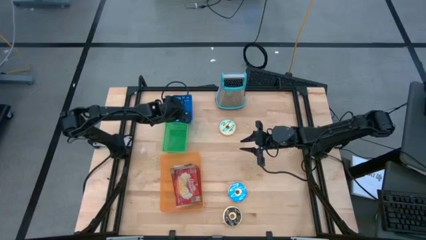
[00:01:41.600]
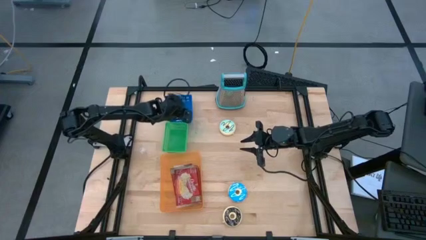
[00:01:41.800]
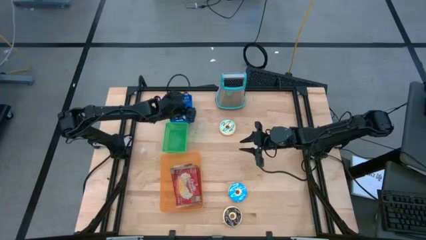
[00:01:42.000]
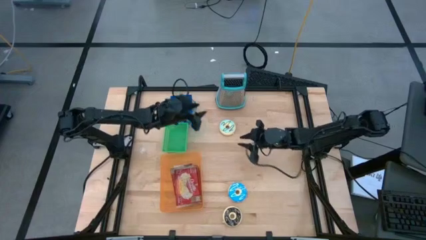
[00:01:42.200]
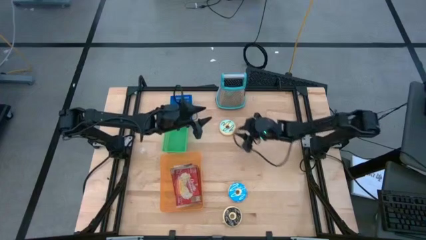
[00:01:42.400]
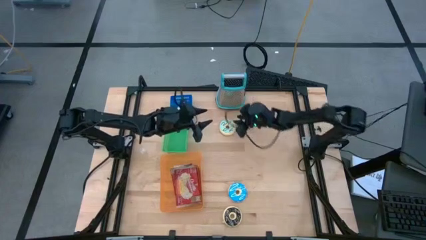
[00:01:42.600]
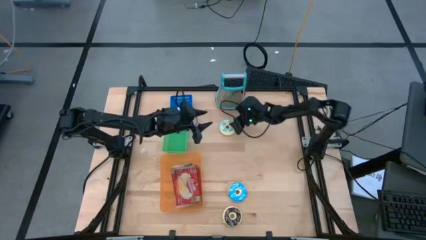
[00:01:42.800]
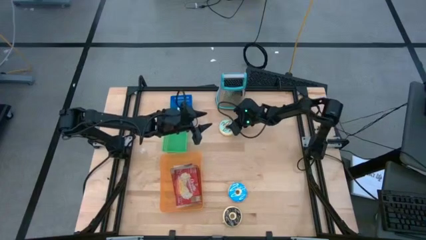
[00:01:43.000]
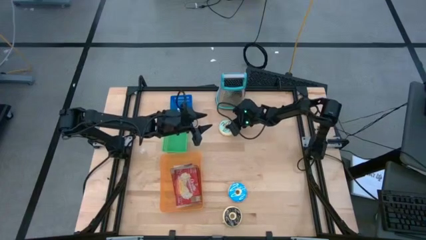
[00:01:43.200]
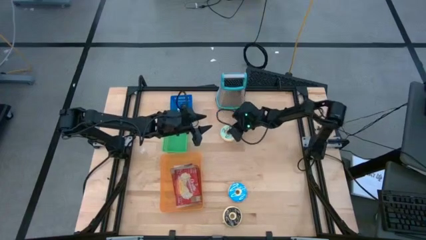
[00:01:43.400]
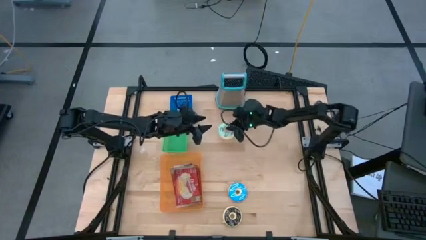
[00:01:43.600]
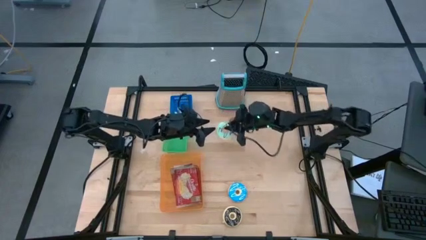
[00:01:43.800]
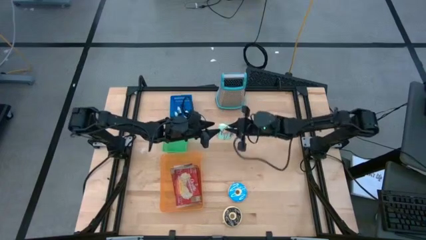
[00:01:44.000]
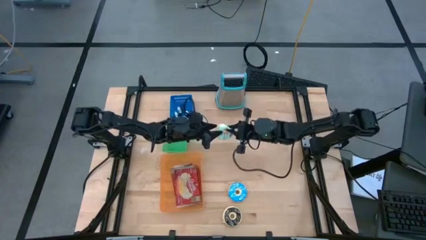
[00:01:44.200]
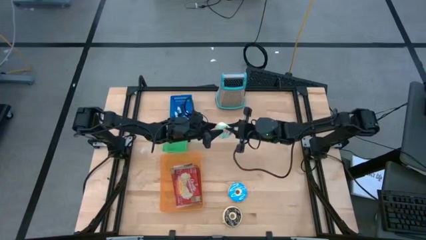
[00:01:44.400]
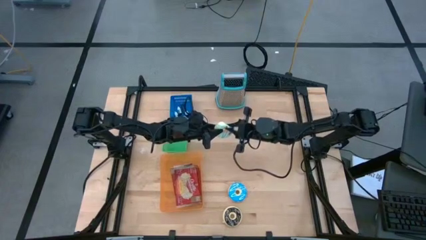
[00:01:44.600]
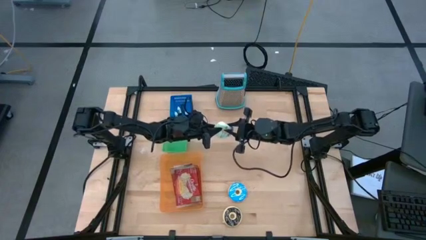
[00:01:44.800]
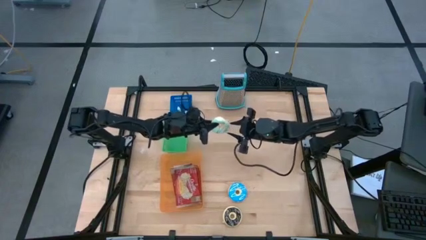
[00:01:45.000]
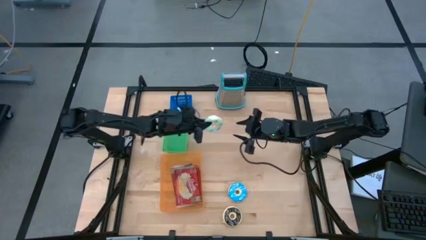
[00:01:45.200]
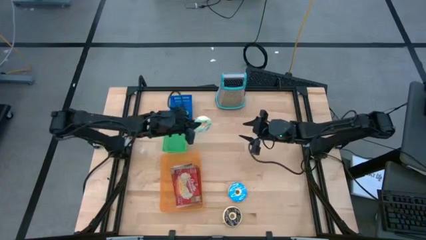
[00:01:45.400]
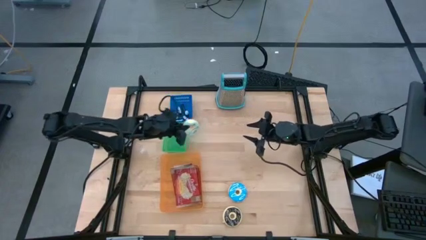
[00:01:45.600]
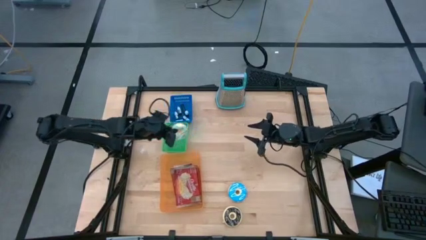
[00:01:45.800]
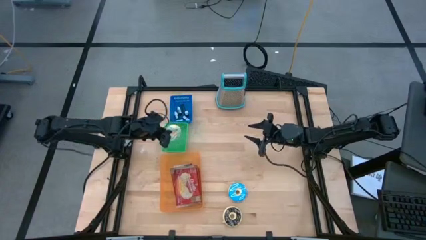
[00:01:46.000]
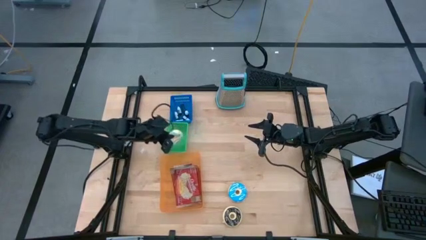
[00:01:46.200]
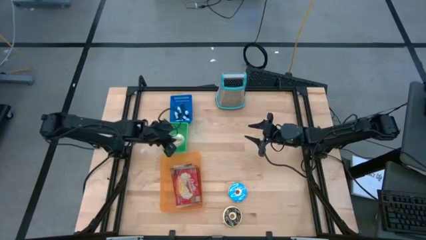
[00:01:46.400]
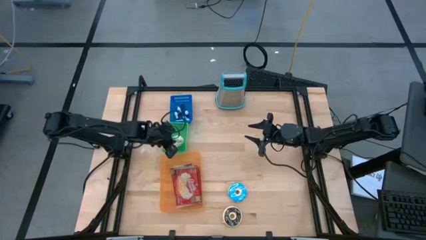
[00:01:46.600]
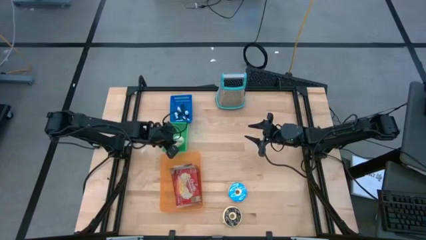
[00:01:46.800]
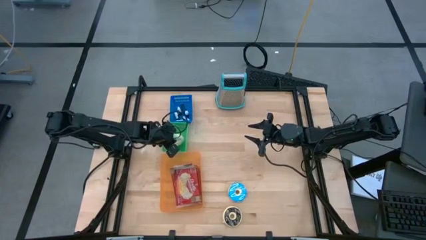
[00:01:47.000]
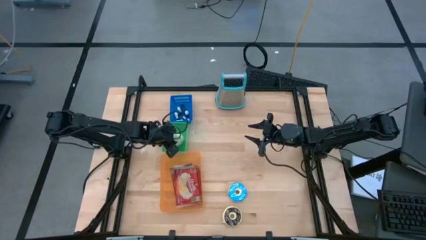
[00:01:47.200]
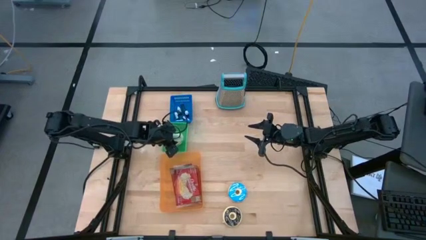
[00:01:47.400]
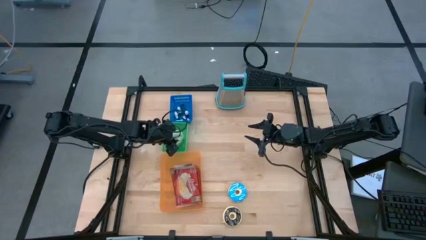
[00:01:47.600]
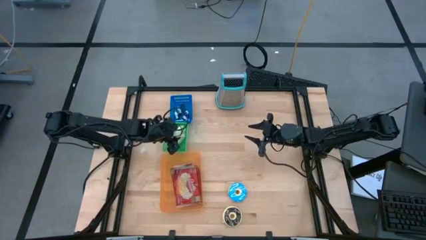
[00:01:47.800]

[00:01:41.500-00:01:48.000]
Put the light blue donut into the green bin

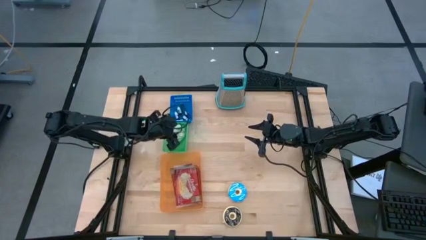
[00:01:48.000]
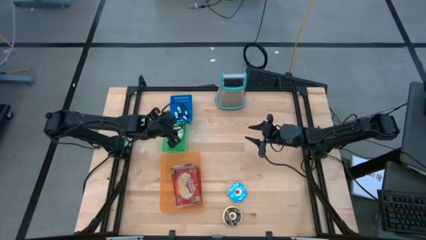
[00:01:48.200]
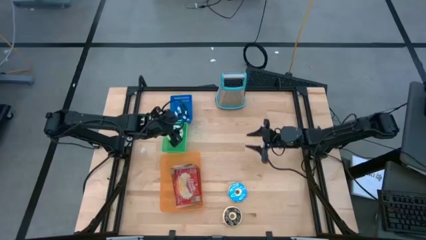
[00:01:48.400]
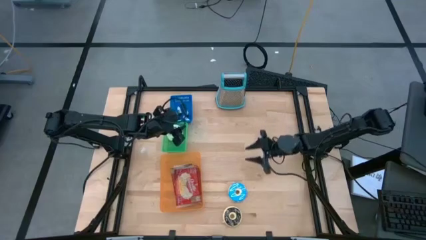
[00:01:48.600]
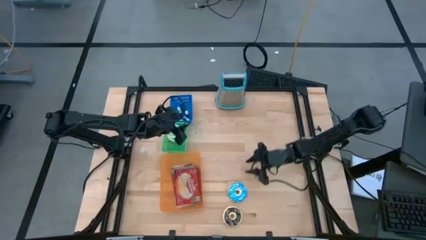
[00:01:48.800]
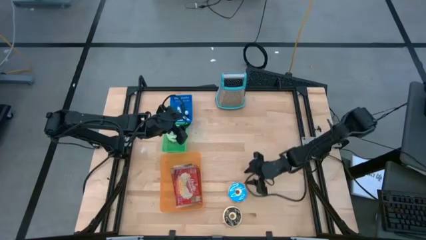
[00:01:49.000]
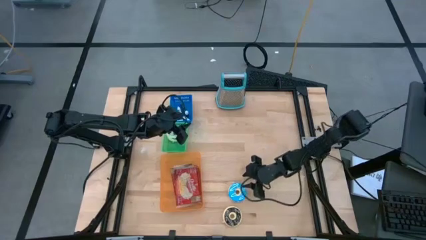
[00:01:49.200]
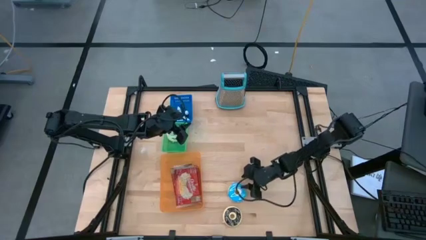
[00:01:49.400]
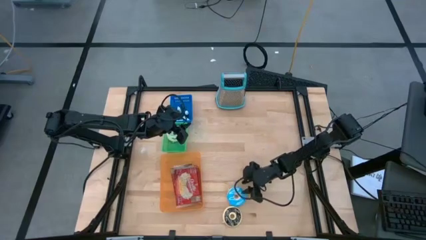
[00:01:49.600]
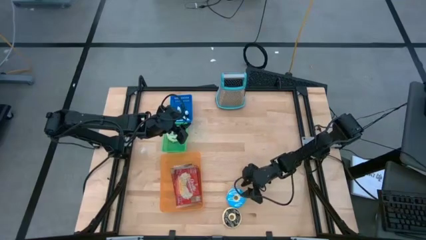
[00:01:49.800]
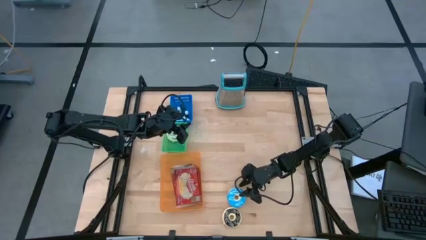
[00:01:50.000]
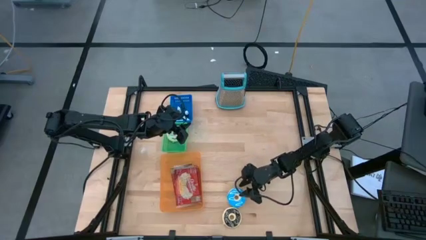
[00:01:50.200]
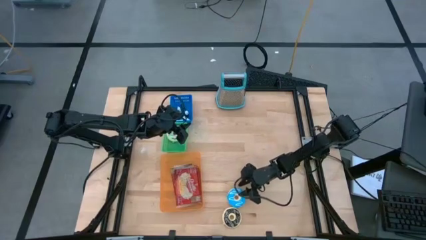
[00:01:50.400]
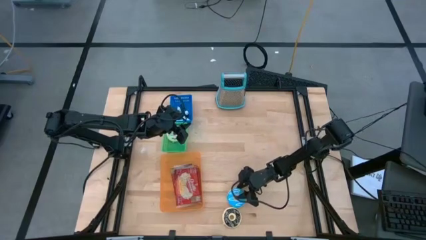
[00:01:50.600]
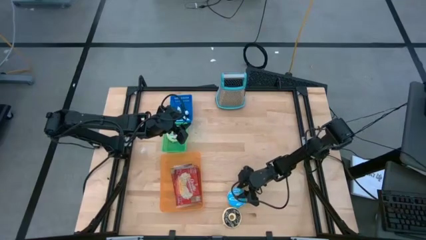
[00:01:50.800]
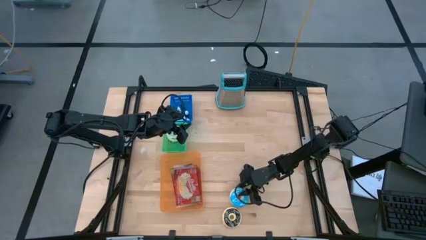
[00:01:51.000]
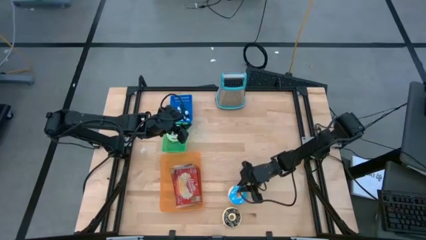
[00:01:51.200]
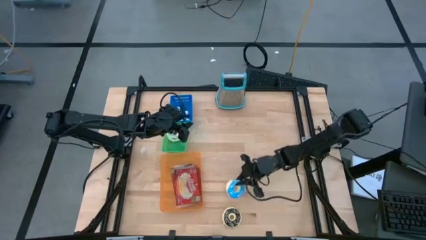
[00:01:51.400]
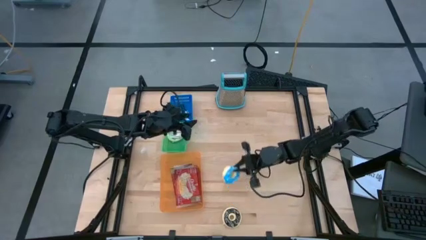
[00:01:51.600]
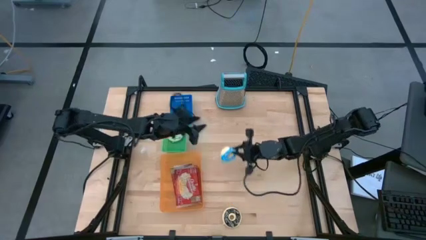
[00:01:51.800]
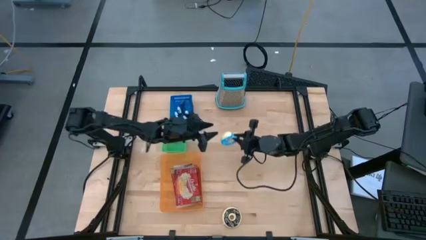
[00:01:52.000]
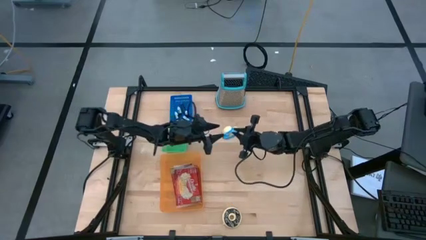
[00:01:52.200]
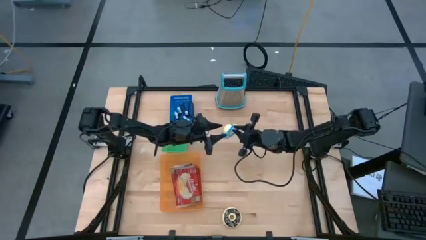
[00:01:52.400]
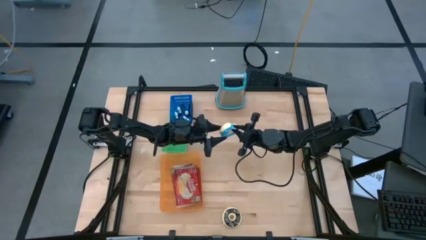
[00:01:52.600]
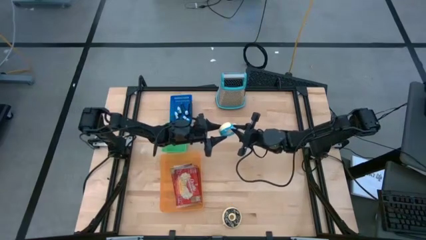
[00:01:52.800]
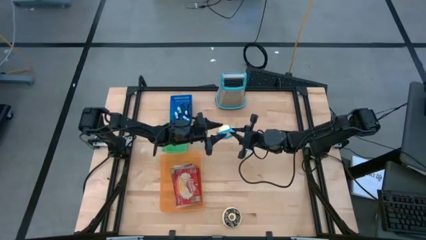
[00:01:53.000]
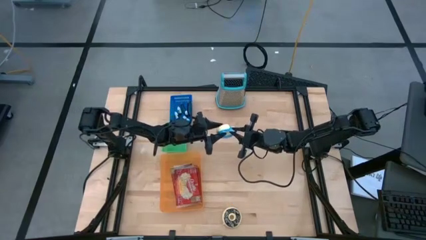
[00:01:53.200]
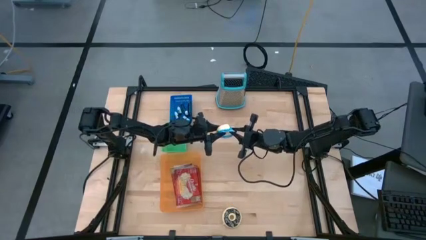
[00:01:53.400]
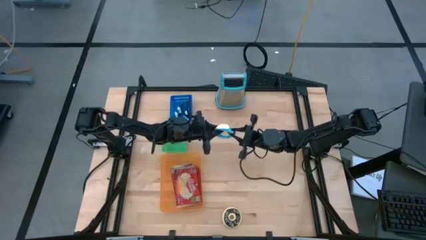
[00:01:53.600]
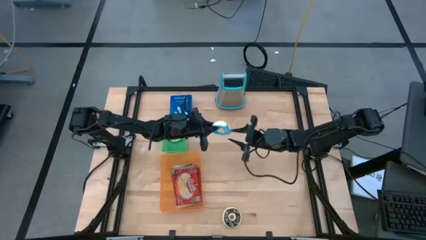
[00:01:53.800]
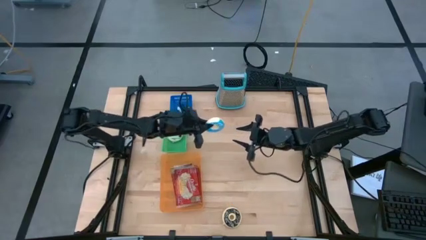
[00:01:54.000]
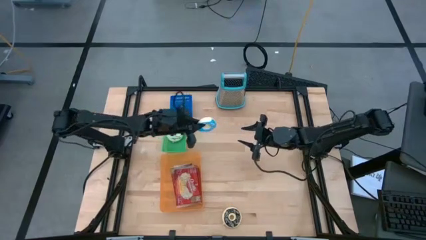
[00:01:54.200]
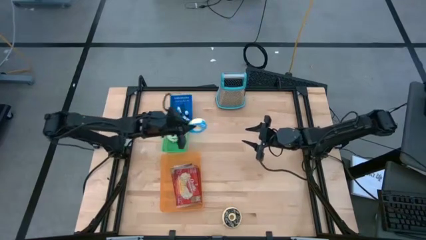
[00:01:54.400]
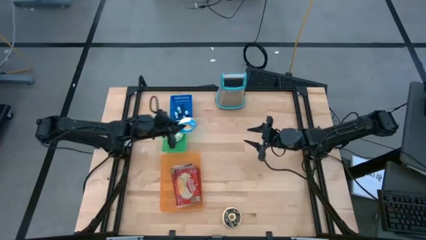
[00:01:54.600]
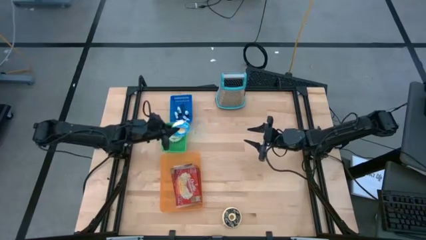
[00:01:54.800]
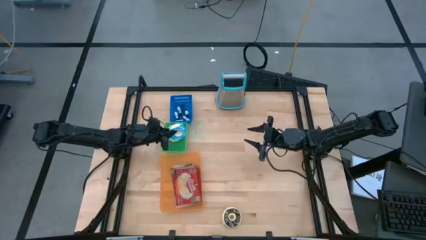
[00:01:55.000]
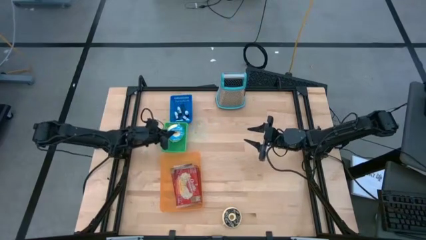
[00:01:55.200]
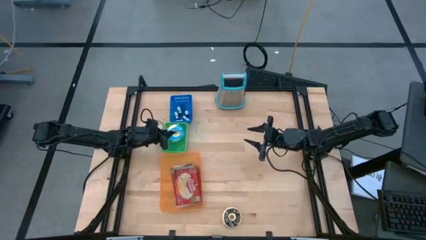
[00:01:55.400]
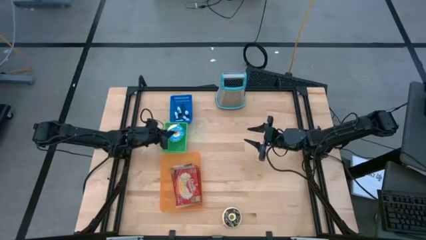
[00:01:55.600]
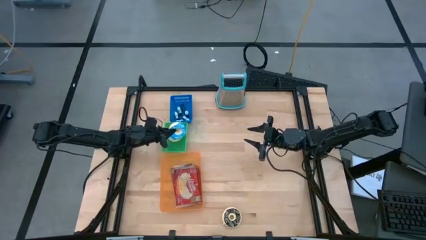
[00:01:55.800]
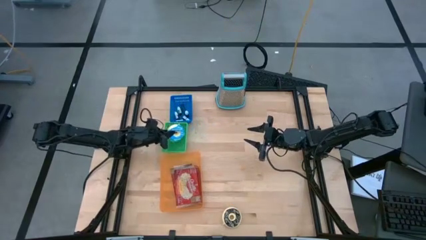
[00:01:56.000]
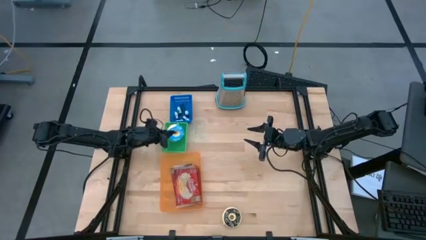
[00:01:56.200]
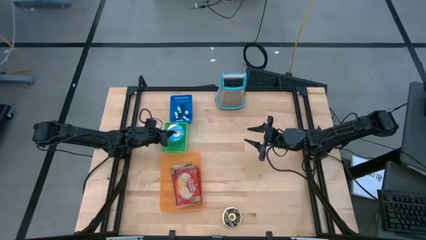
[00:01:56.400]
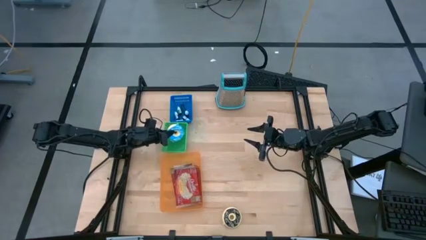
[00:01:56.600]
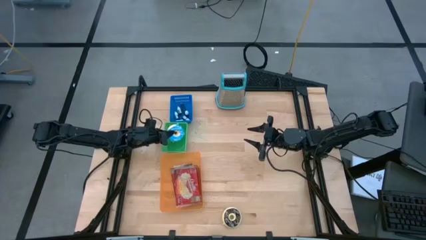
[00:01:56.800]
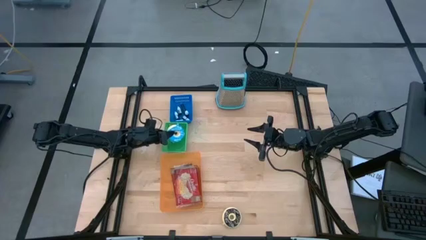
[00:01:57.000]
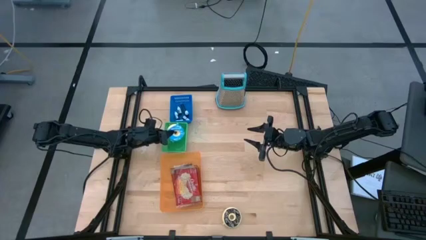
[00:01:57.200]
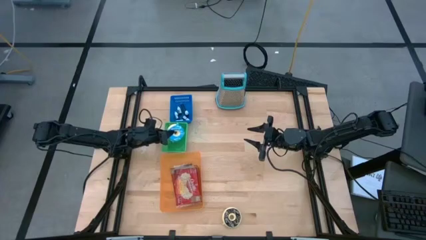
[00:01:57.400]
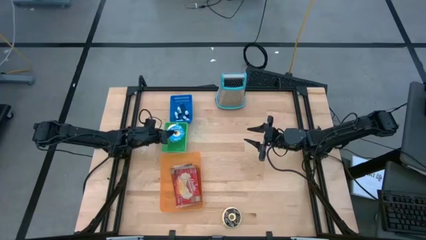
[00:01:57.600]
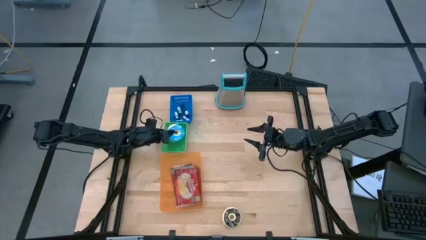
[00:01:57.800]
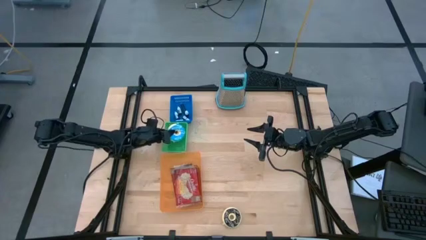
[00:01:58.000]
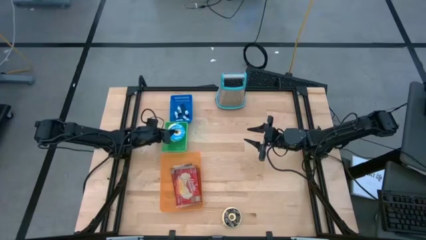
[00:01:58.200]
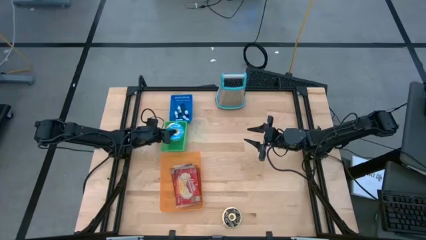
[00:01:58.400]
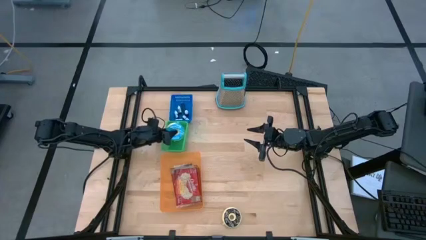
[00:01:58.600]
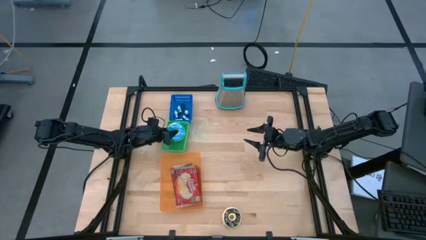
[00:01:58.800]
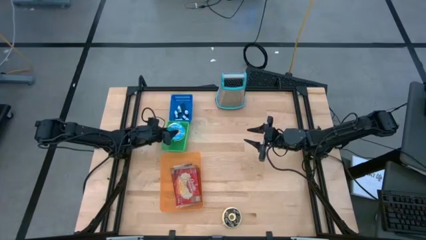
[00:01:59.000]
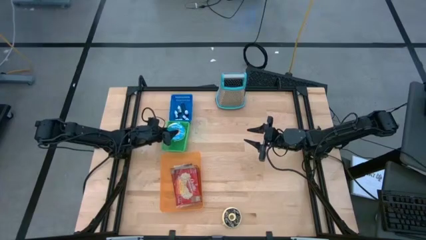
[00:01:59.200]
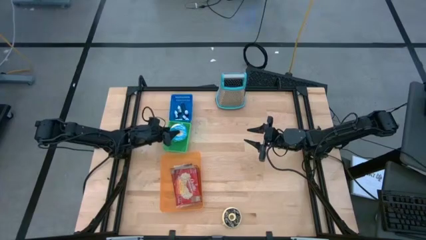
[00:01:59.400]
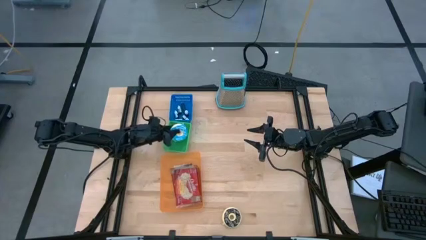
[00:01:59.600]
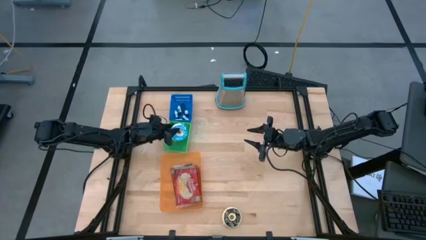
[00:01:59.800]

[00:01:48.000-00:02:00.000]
Put the blue donut into the green bin
